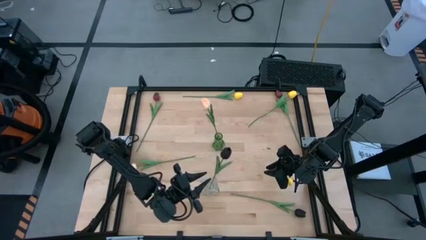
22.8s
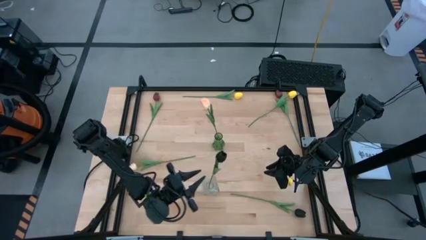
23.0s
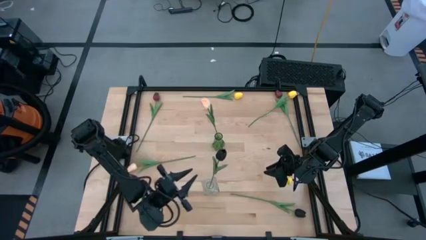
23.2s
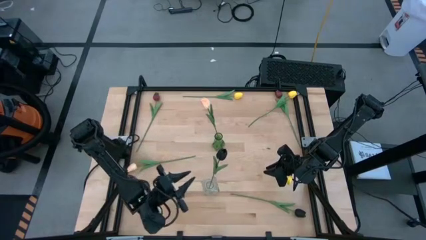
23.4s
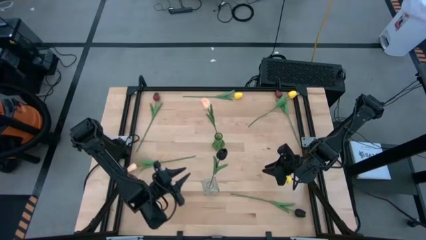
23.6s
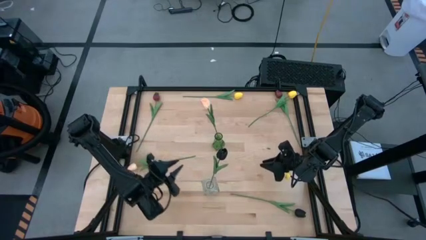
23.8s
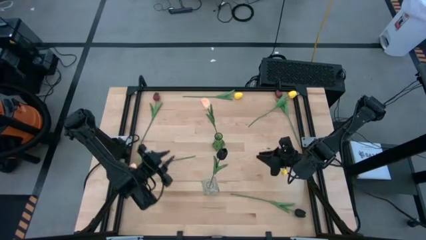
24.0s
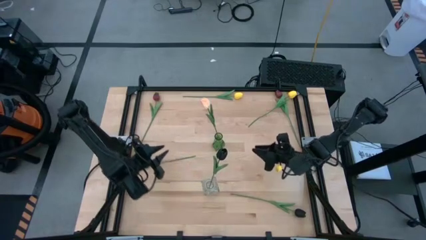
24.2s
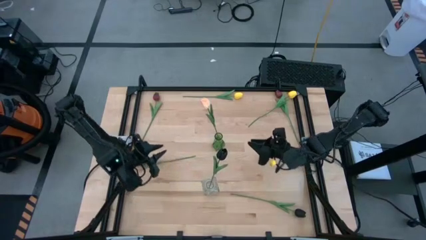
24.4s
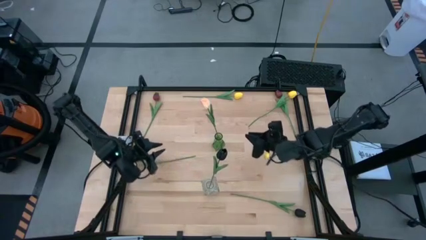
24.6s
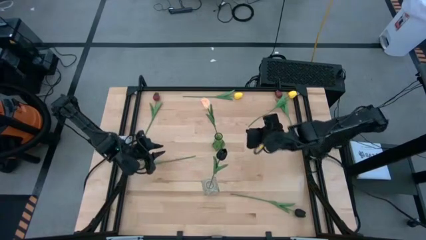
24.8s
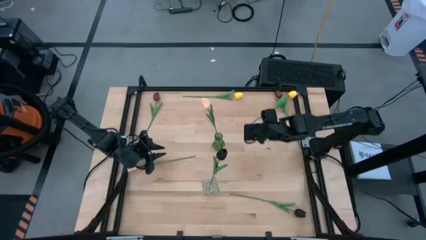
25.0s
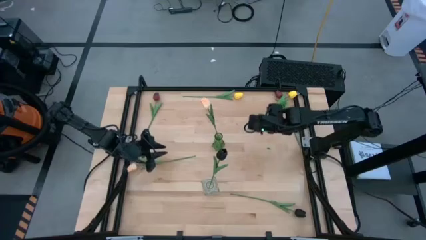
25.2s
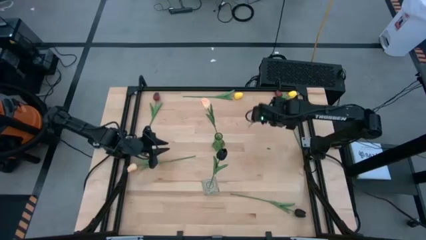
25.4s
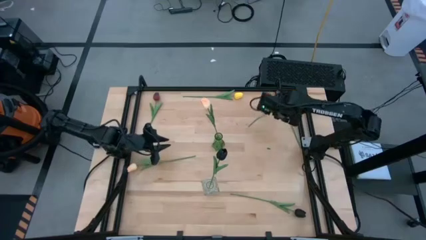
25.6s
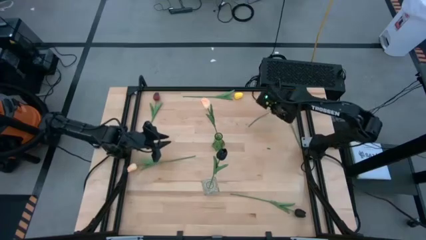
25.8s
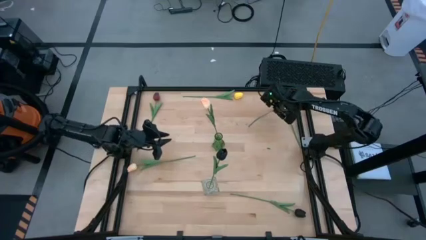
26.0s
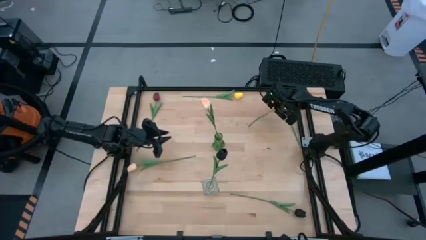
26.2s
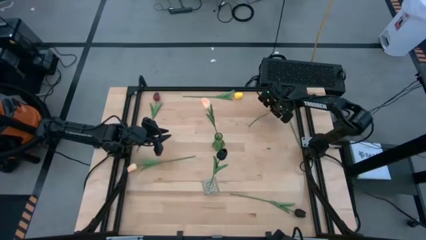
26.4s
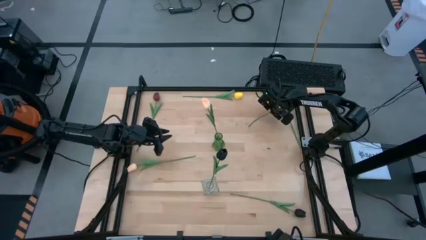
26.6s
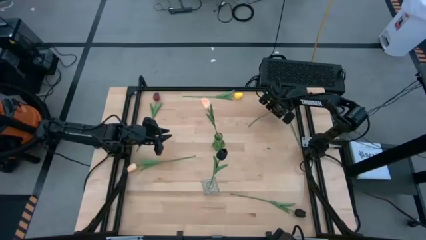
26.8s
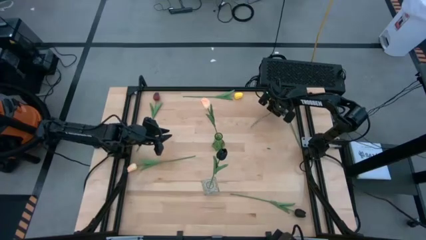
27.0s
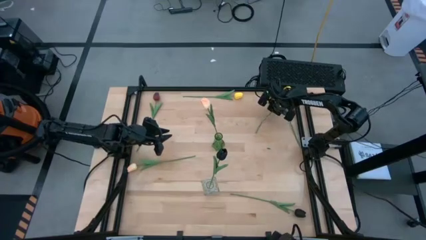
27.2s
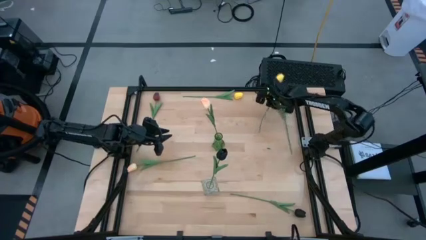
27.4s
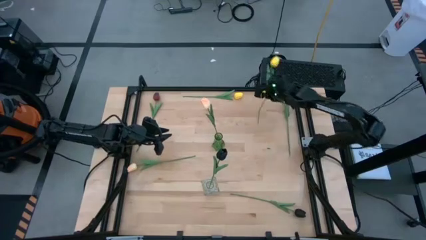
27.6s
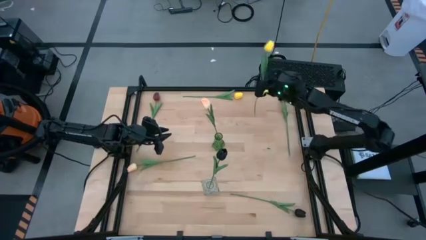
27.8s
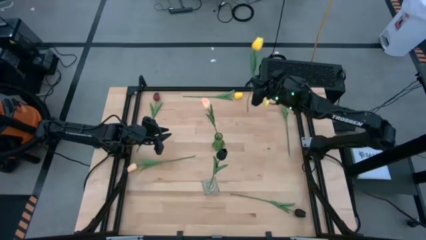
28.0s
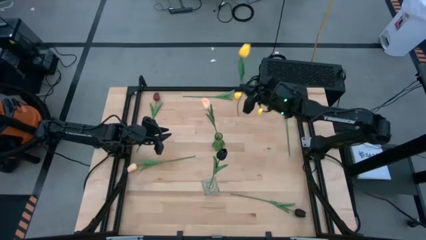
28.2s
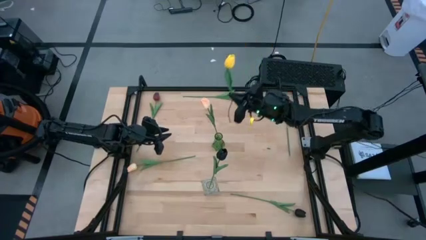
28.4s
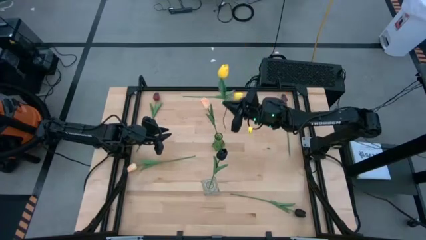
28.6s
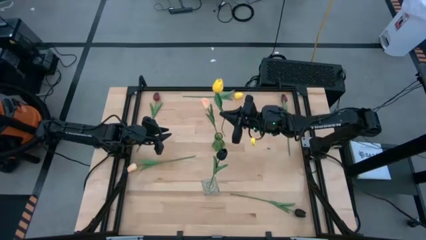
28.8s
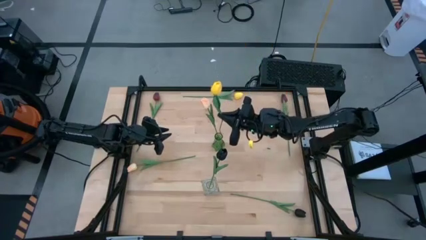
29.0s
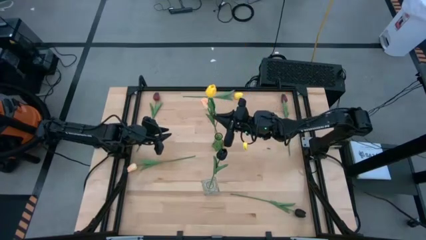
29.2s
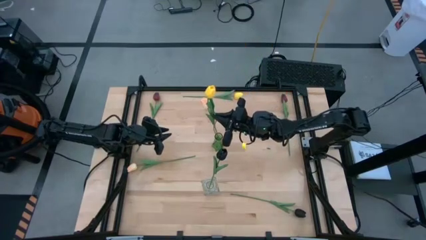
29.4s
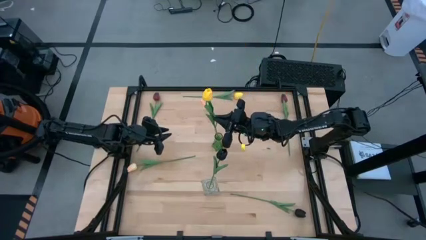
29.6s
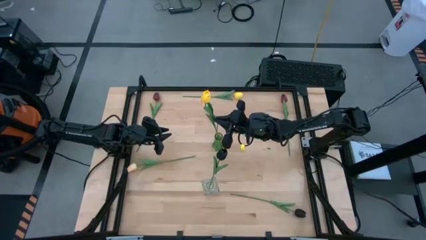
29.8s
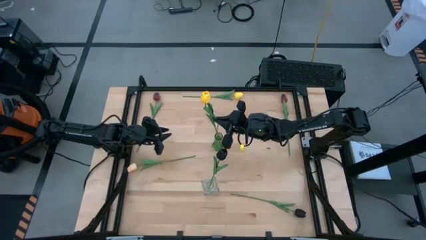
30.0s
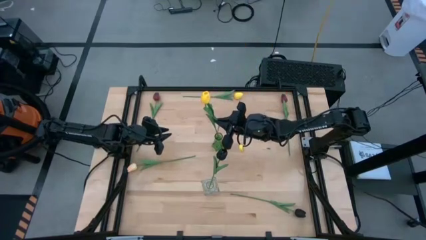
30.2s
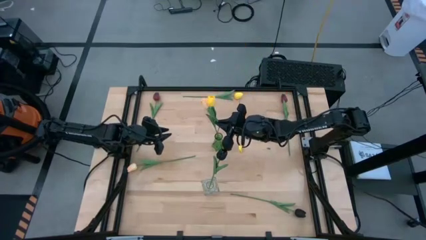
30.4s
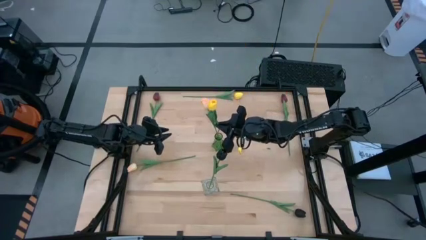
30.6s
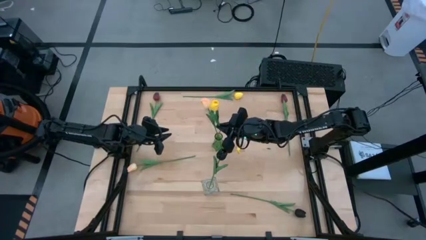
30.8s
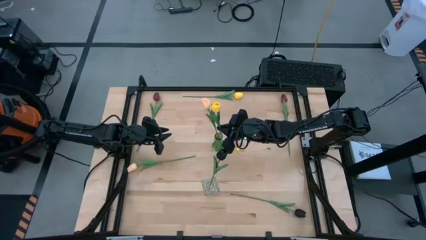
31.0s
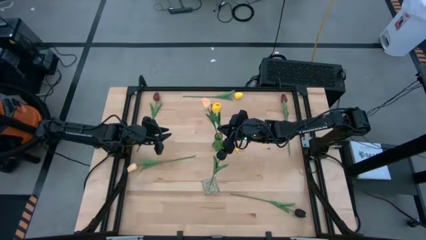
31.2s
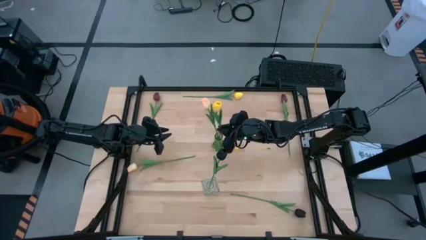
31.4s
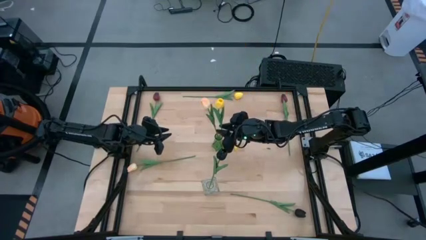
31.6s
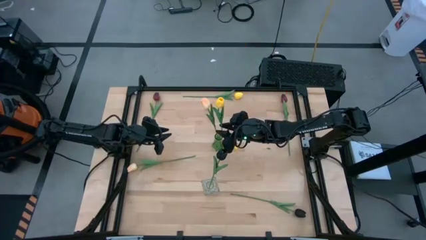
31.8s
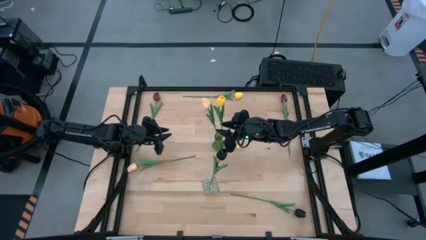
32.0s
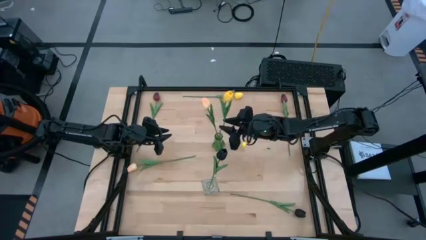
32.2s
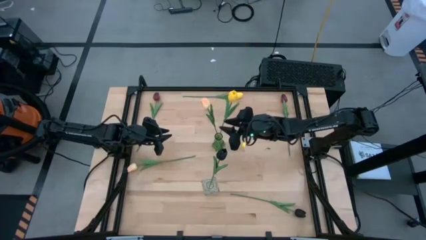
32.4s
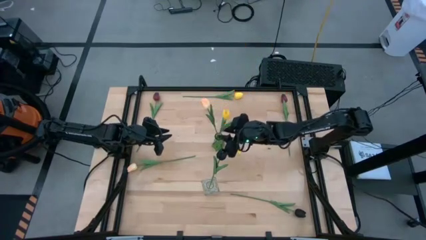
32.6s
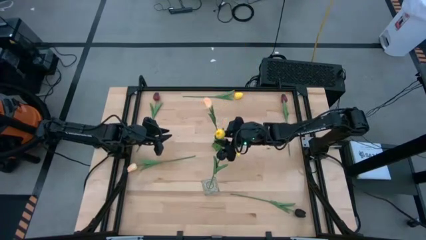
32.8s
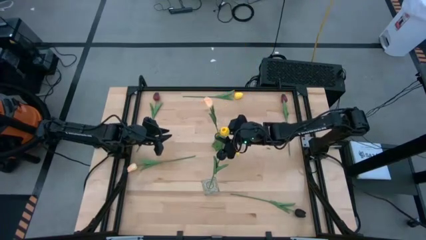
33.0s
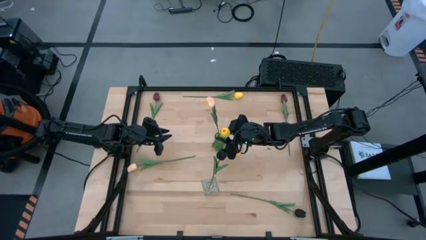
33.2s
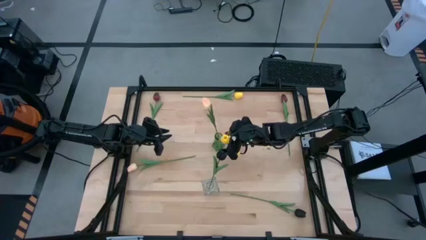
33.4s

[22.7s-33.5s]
Task: Sort flowers into vase by color
Put the right yellow flower into the green vase
